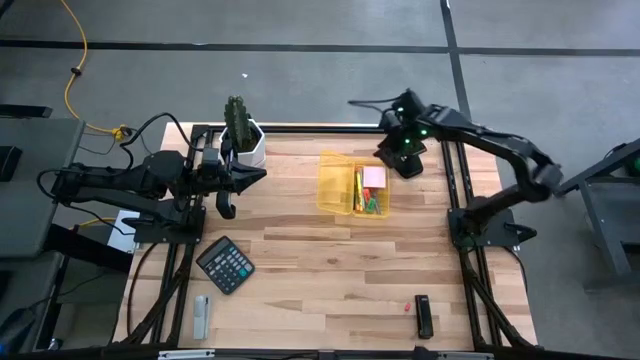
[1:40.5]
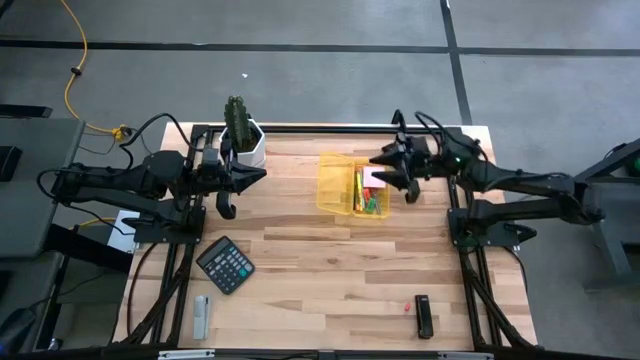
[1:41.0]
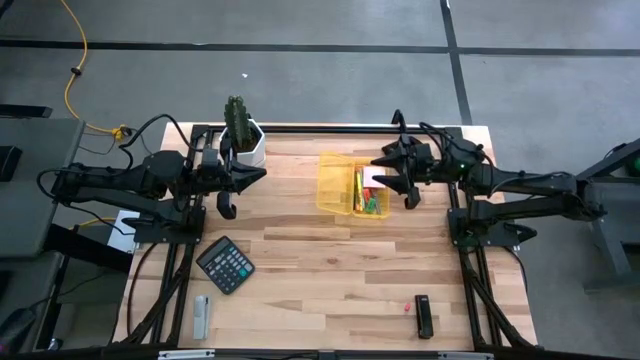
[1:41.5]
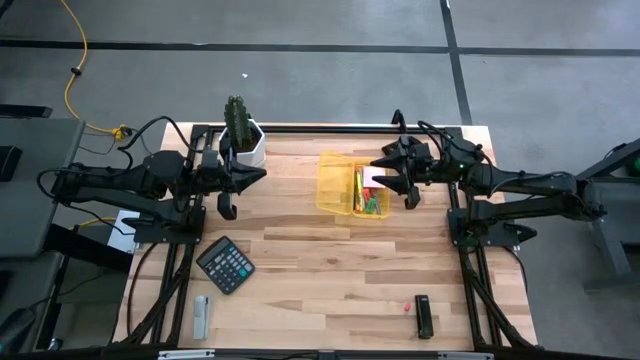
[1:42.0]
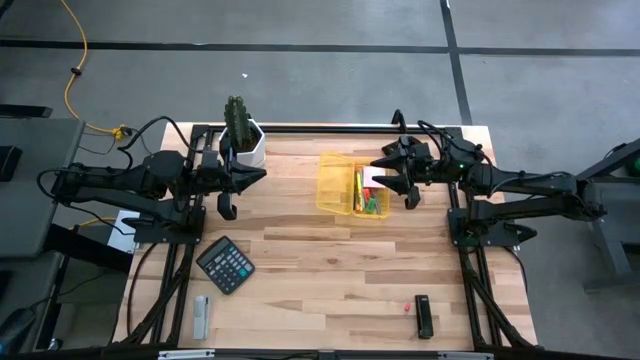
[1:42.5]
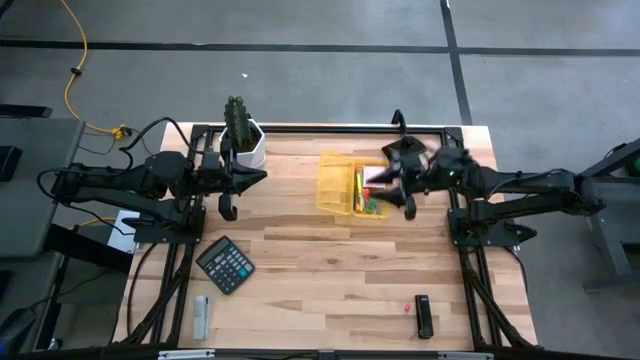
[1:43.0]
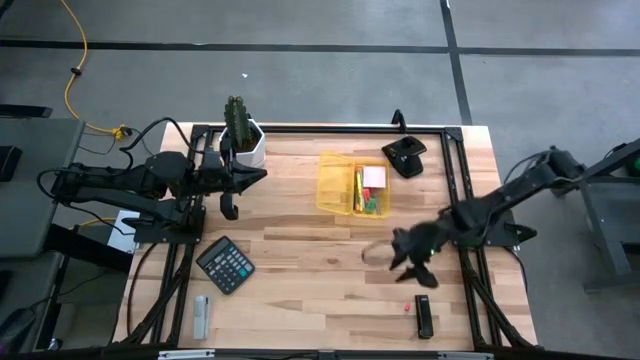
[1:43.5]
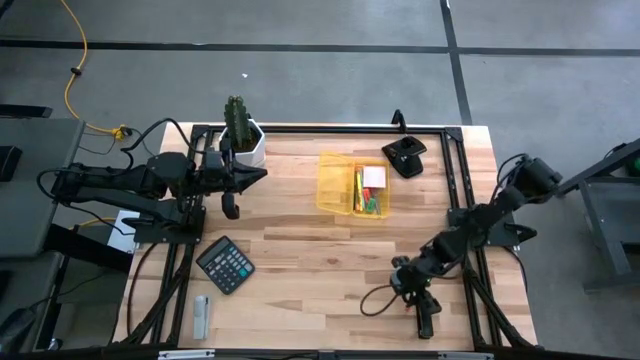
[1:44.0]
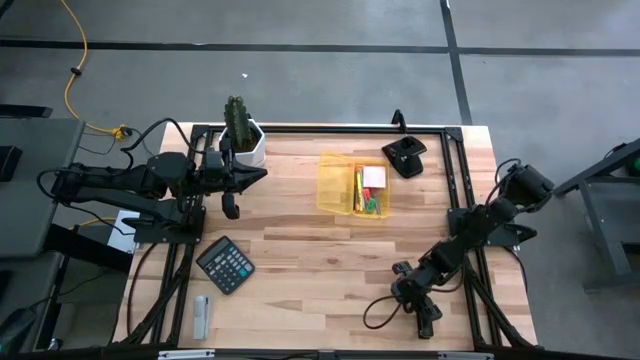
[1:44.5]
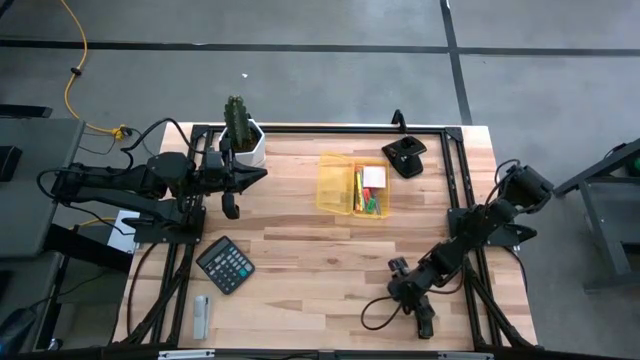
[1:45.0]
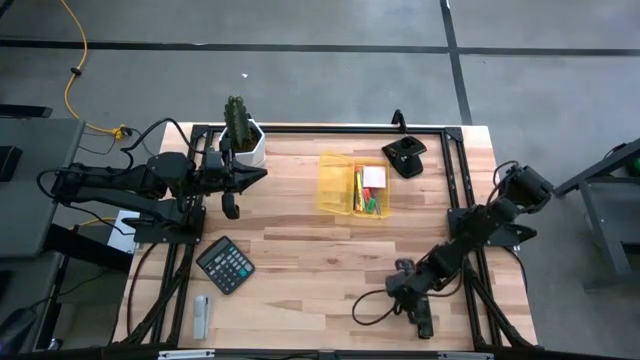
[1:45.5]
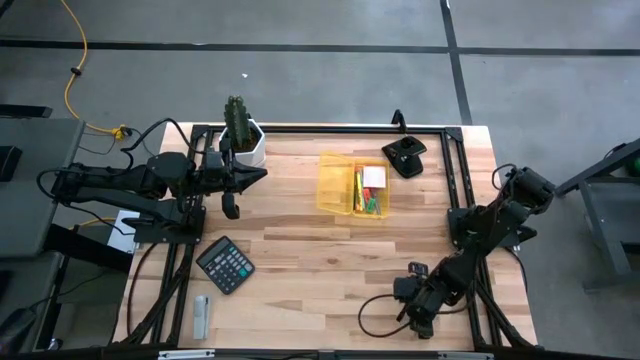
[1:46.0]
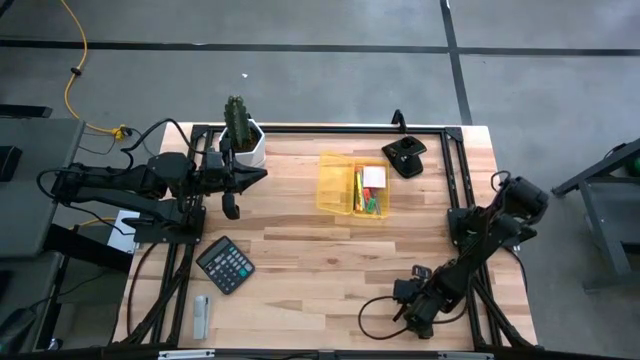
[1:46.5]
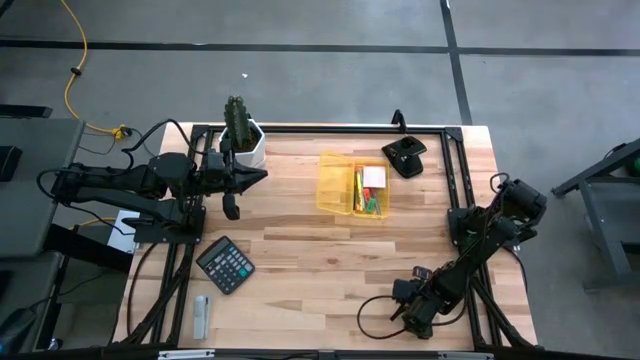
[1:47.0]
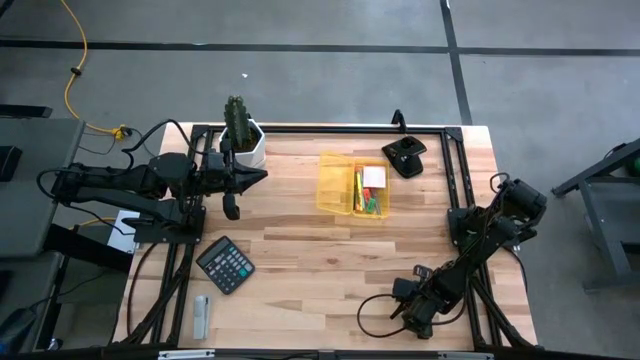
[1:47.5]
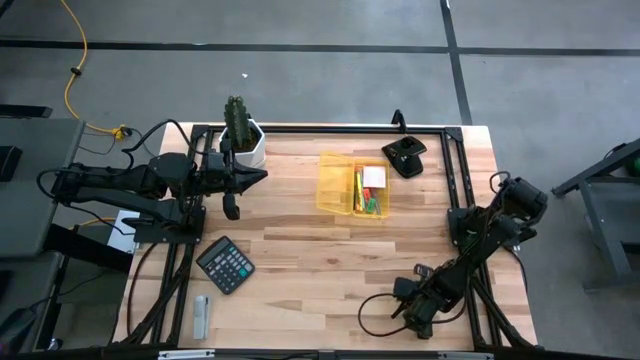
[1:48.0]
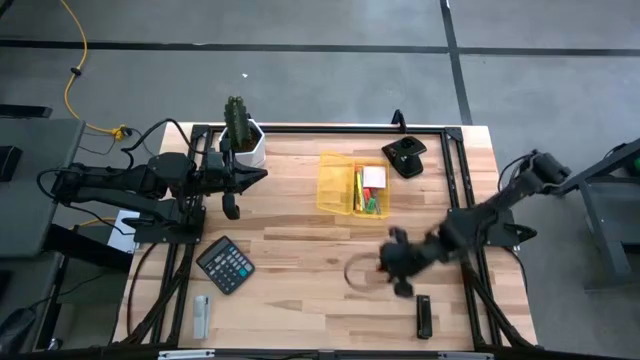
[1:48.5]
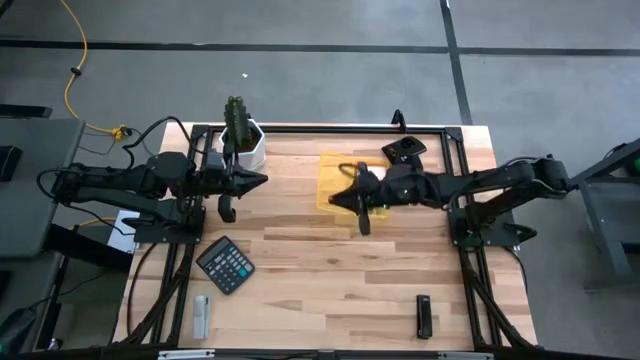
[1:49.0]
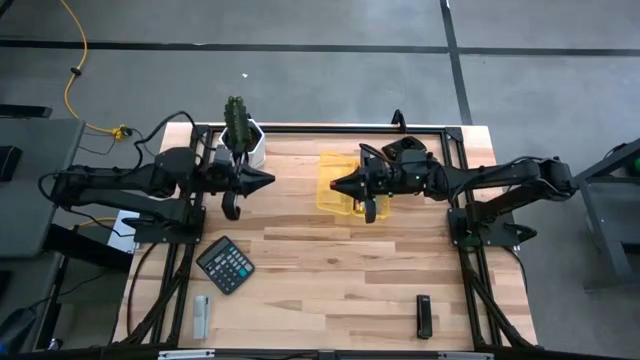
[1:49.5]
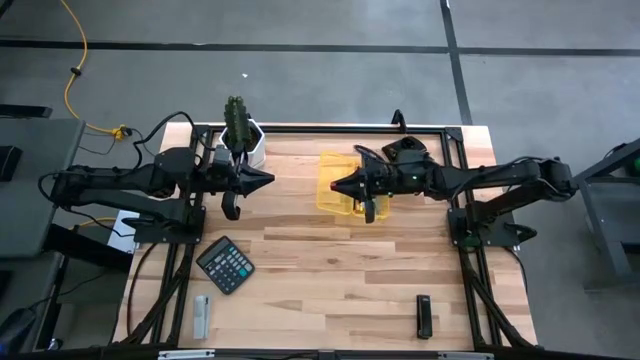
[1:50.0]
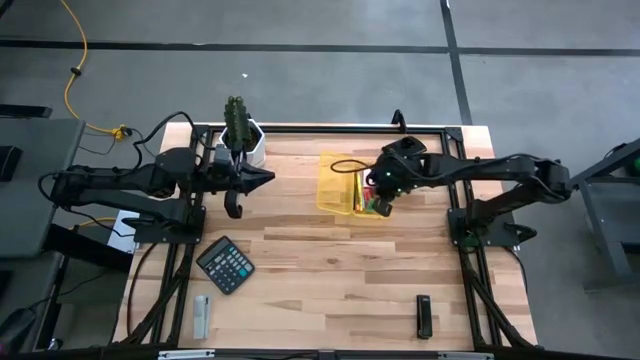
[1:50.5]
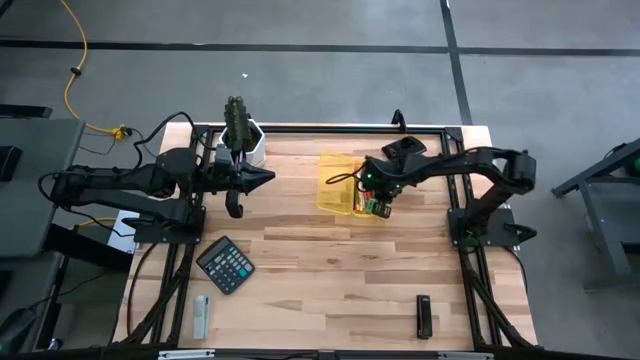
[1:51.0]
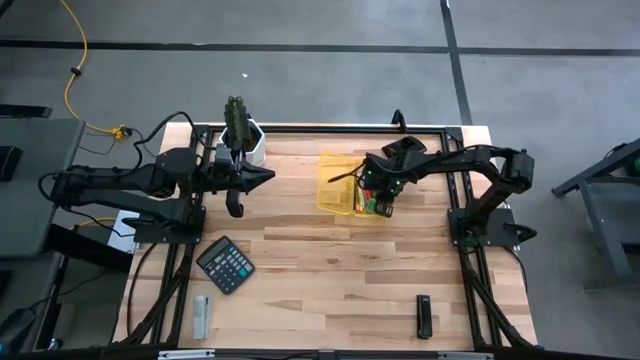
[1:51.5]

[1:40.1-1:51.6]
Task: Pack school essentials
Put the pink pencil top eraser into the yellow supply box

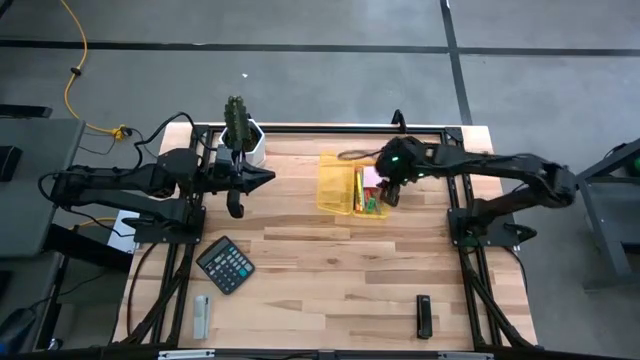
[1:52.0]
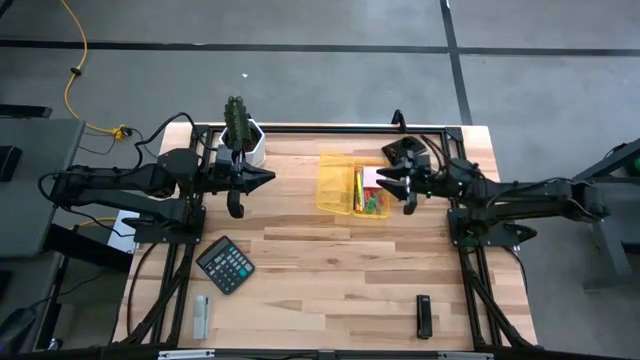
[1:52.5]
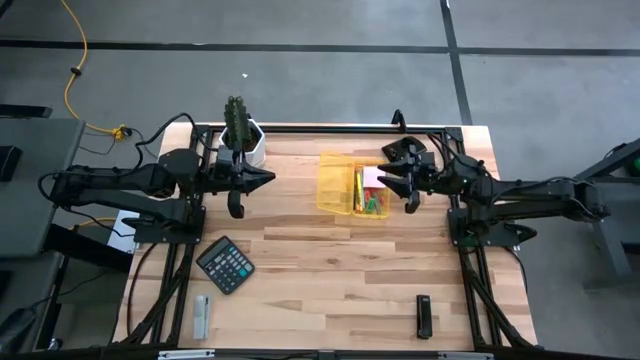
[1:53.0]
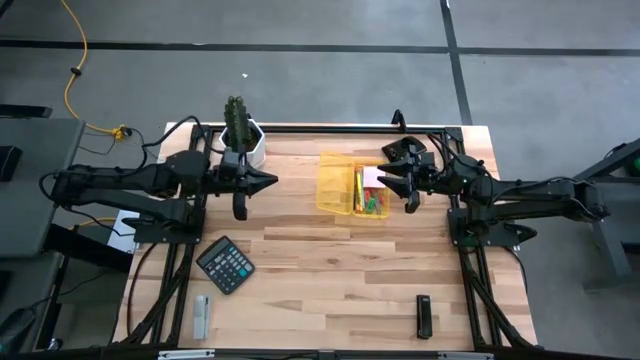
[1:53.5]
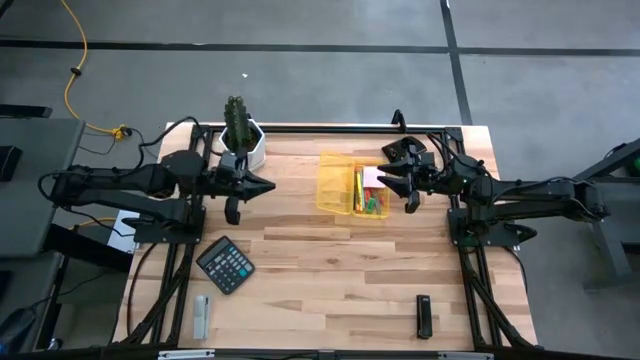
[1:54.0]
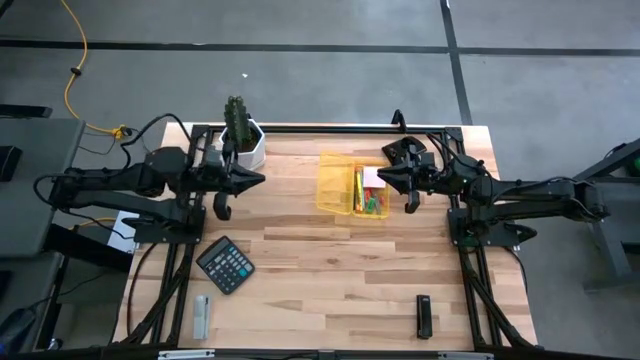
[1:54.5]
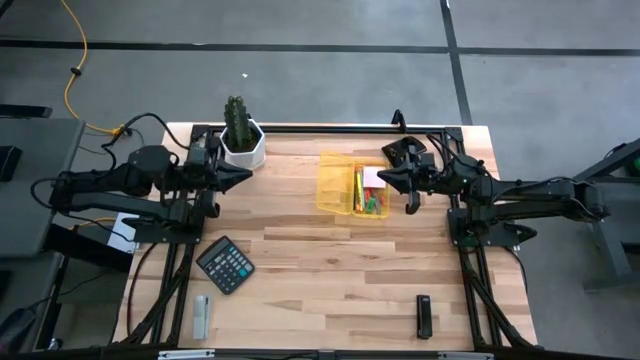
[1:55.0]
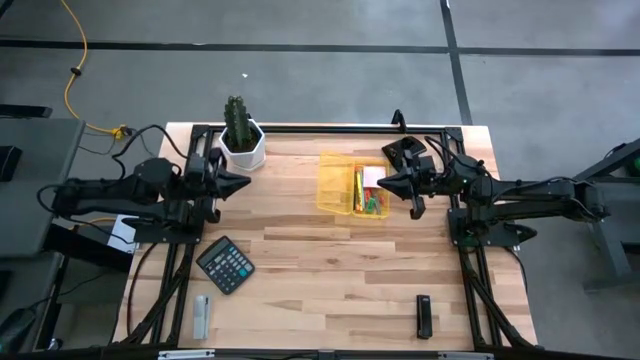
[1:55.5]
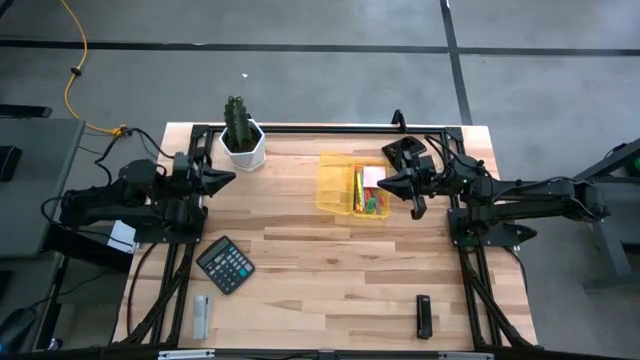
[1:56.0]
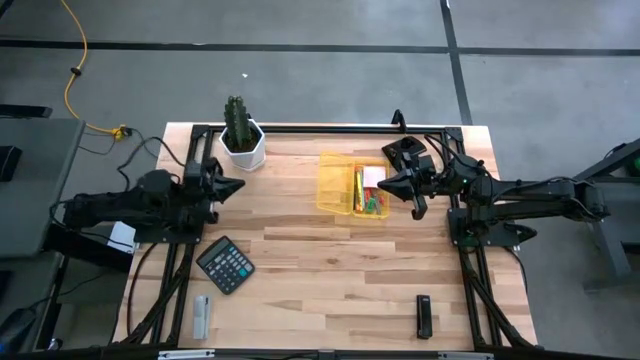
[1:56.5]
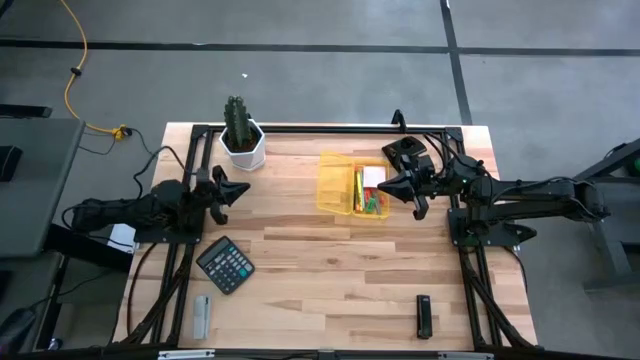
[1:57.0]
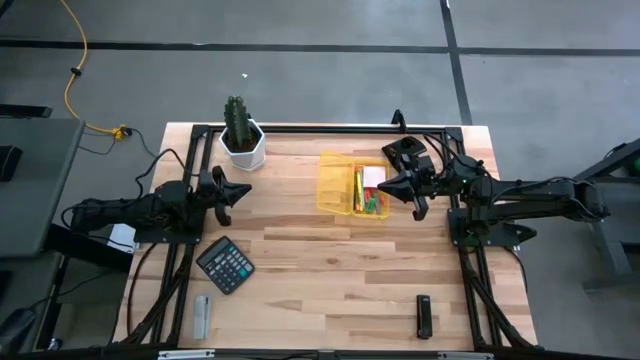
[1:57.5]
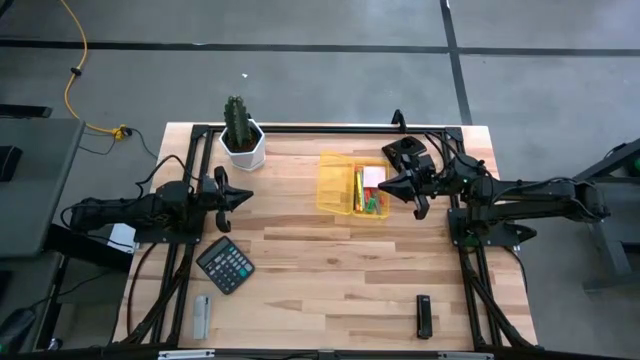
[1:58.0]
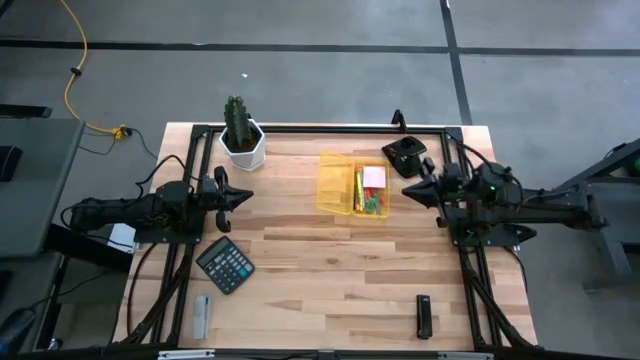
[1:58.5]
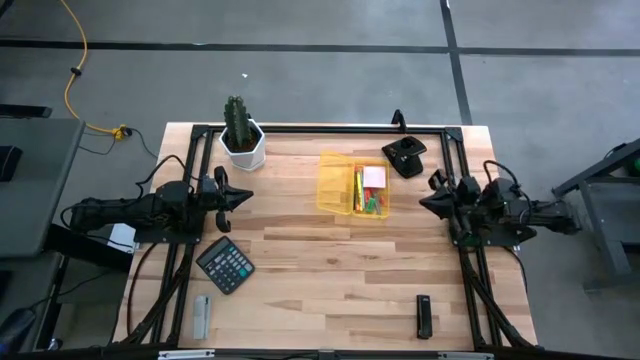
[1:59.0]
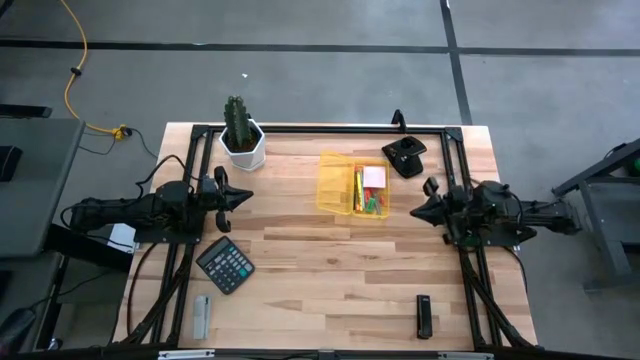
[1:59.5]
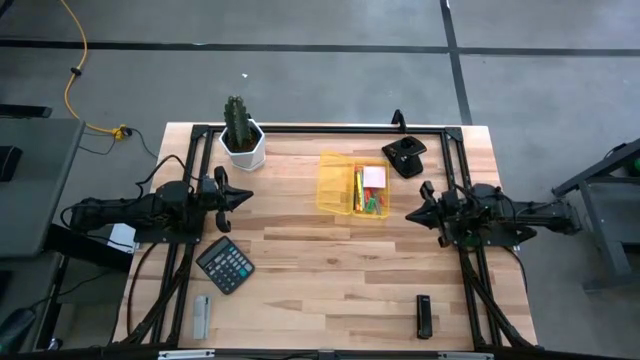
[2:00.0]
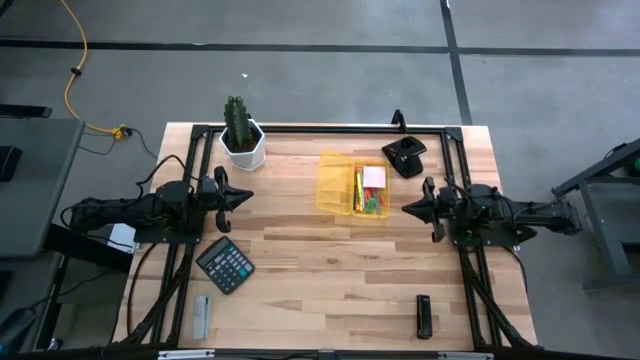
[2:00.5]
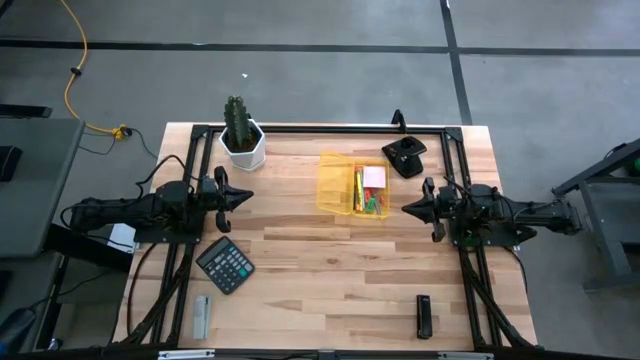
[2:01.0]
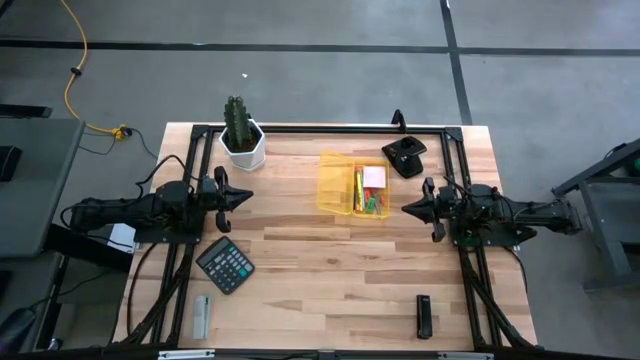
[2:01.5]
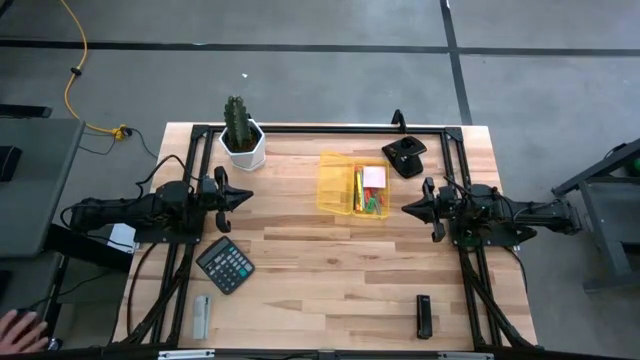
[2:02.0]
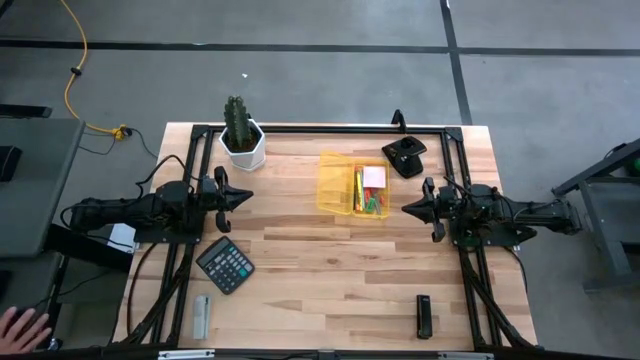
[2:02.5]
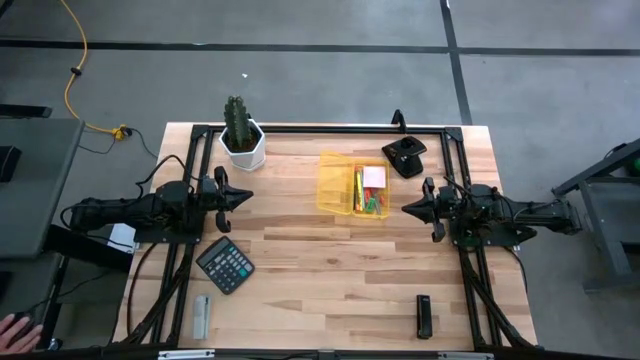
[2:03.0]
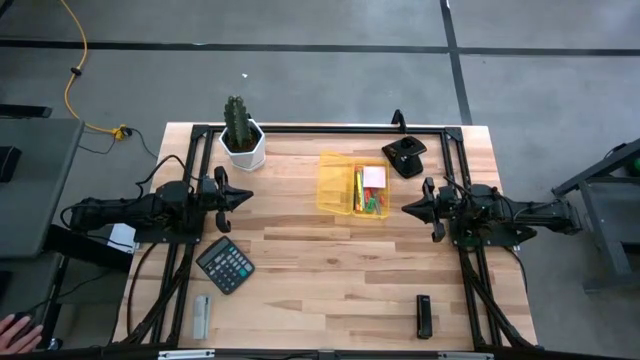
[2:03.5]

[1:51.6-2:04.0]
Return to Home Position
